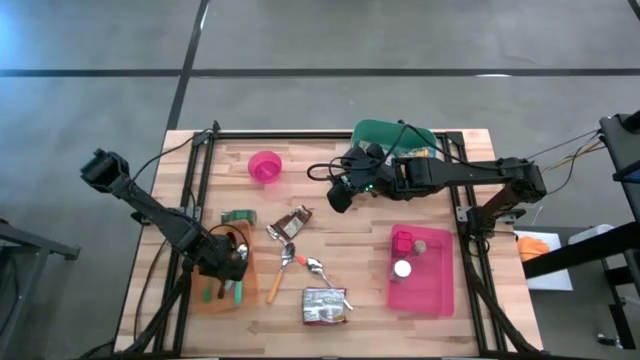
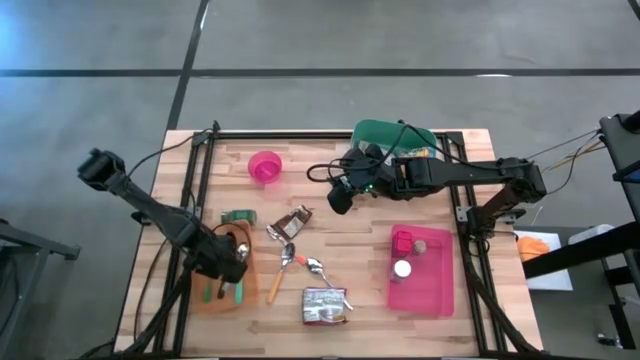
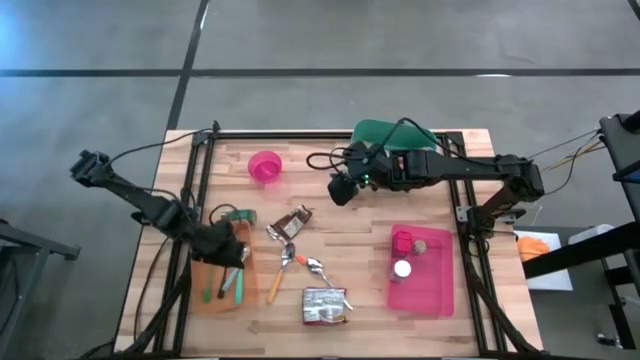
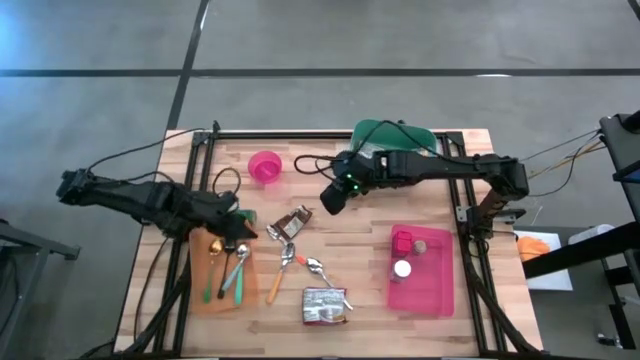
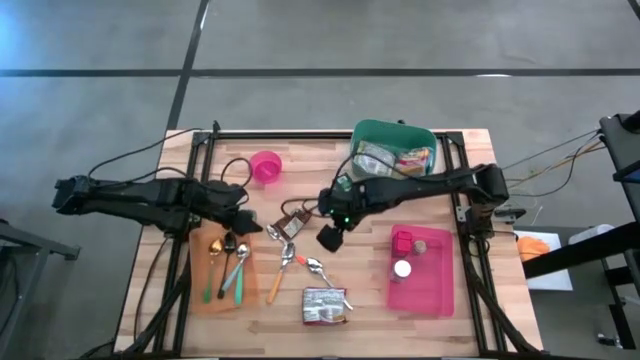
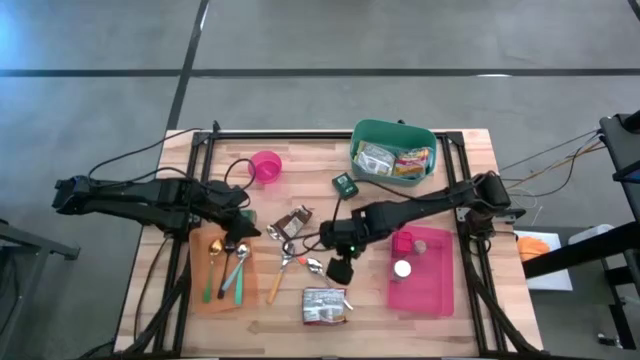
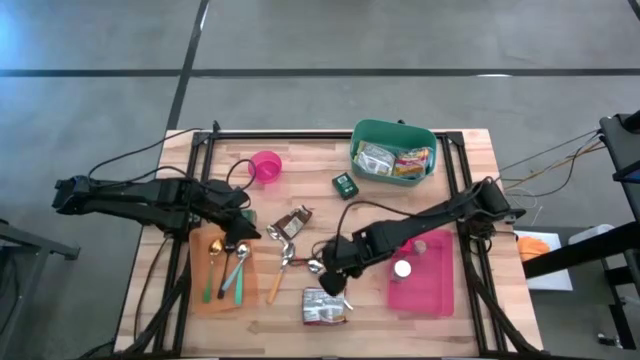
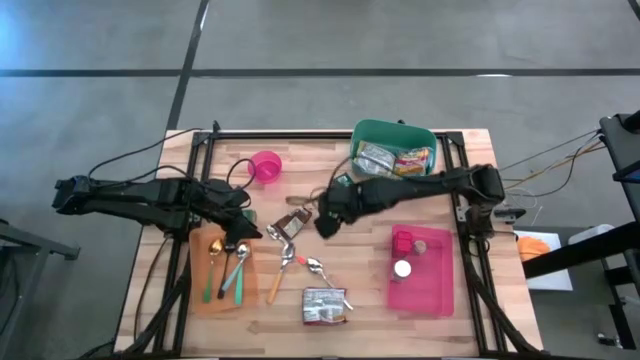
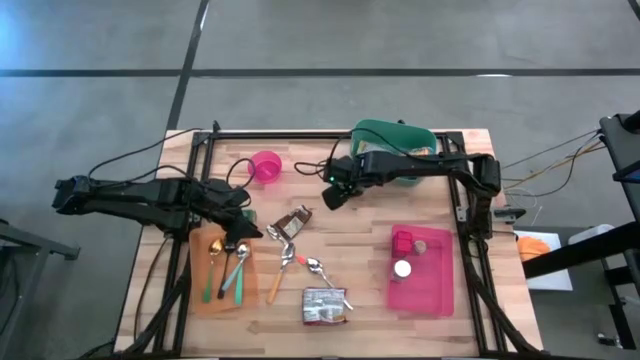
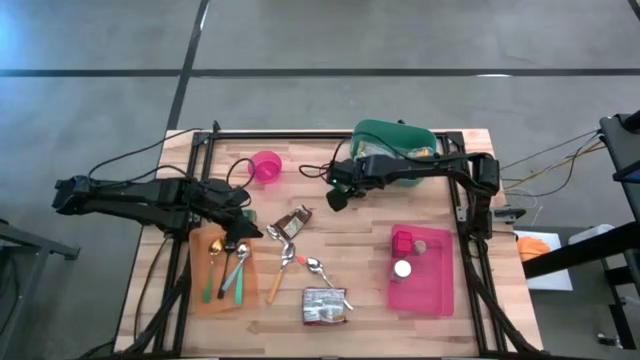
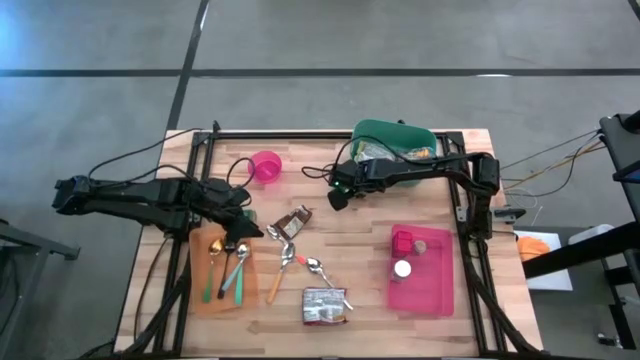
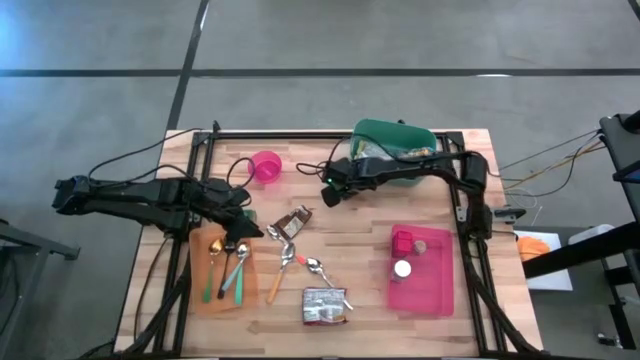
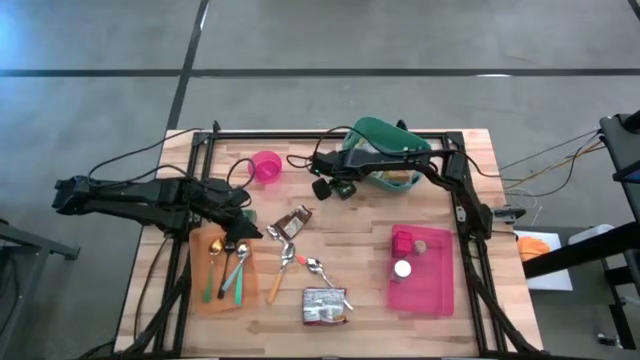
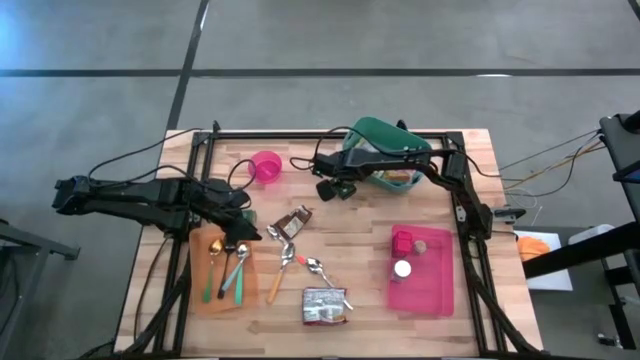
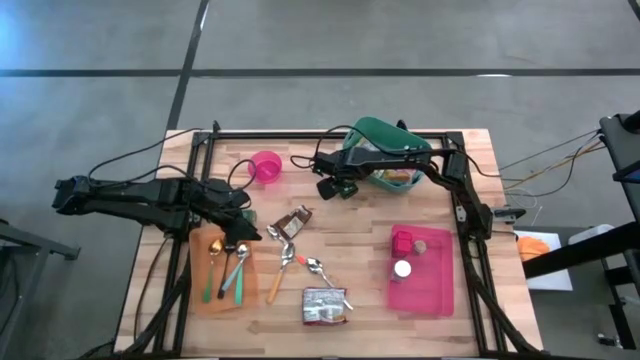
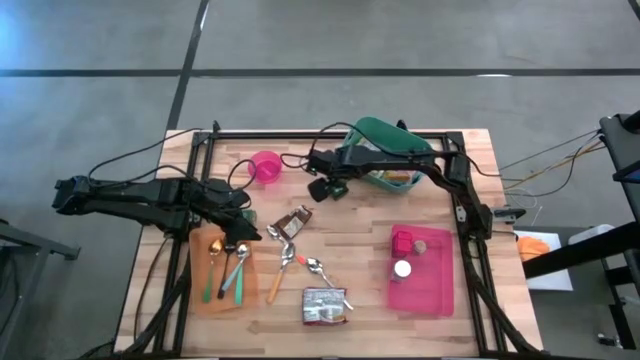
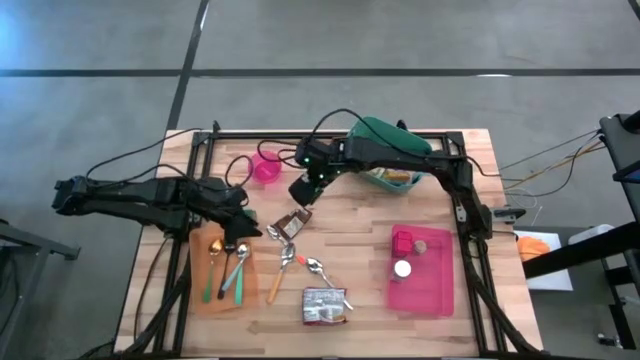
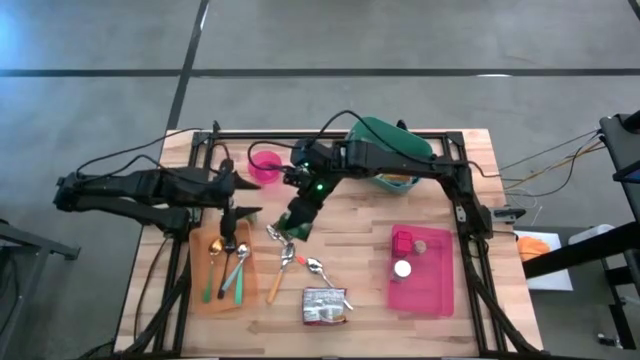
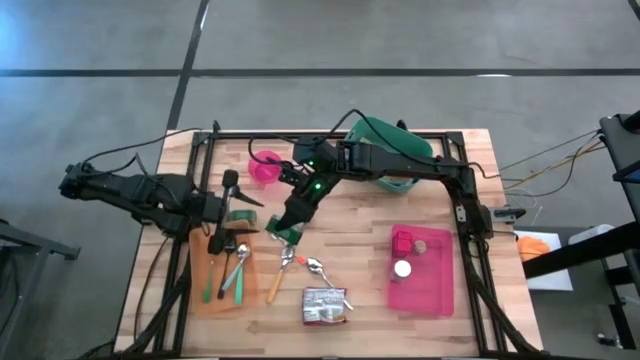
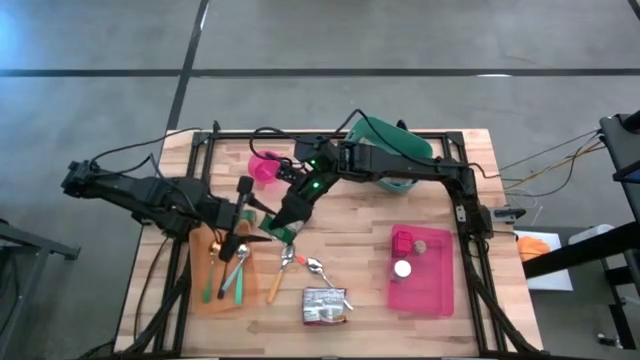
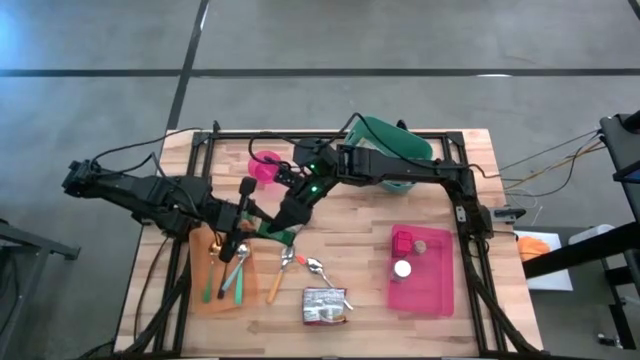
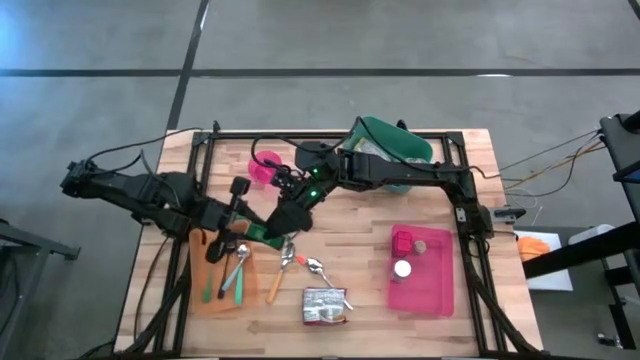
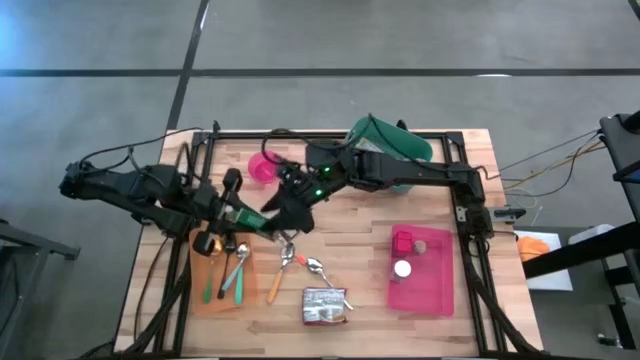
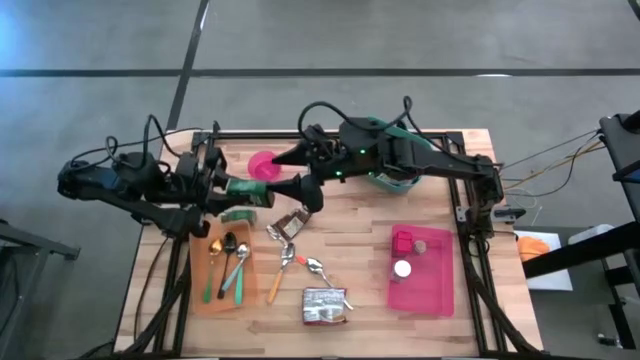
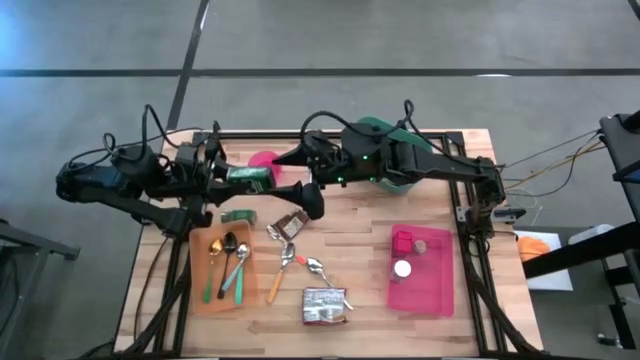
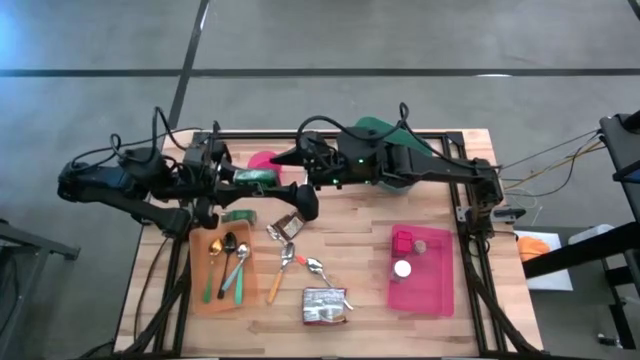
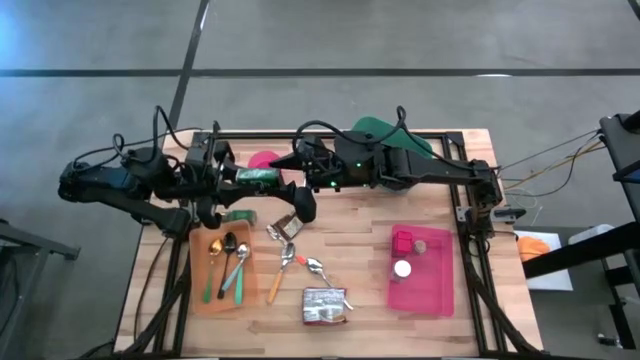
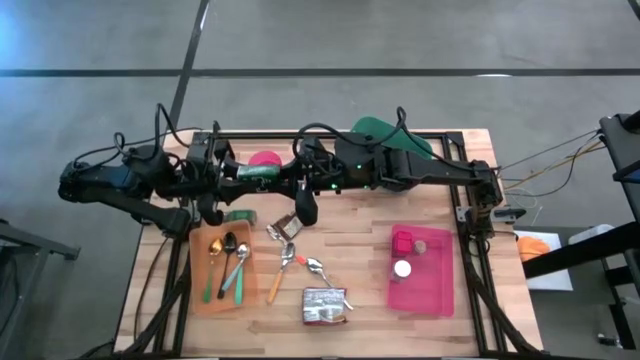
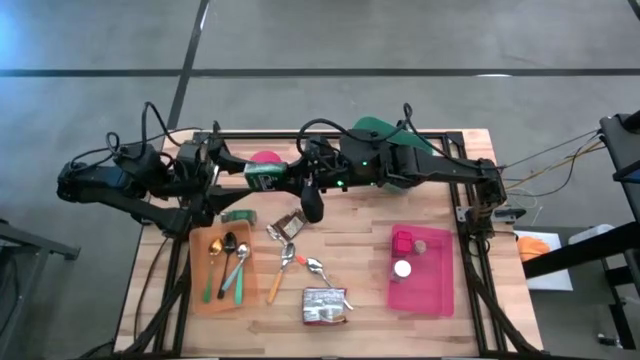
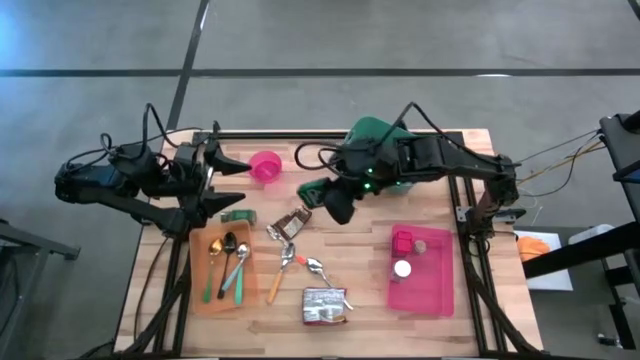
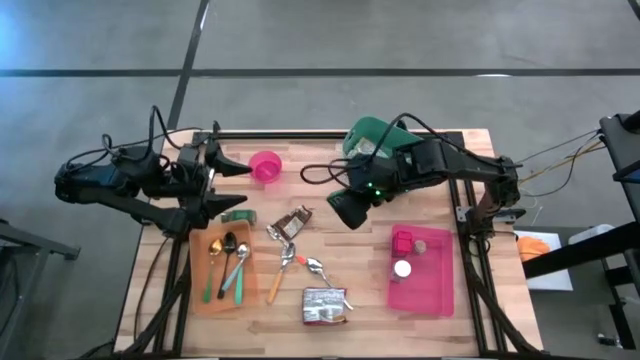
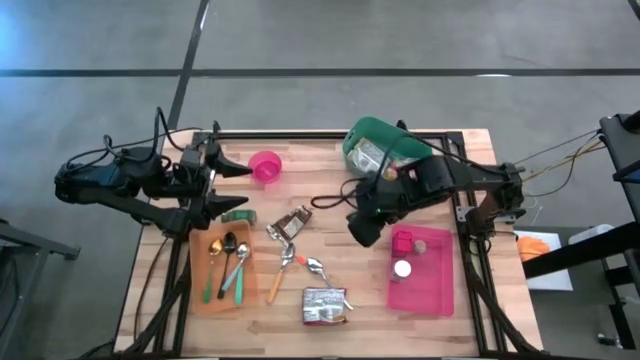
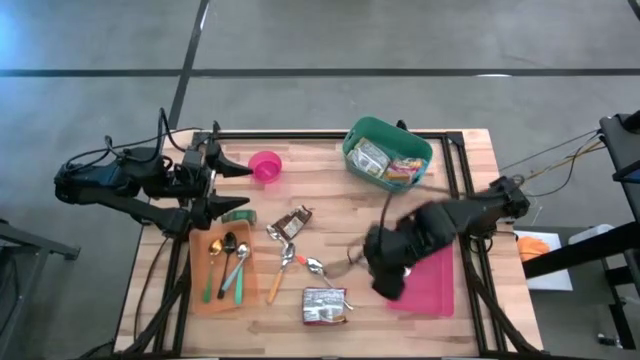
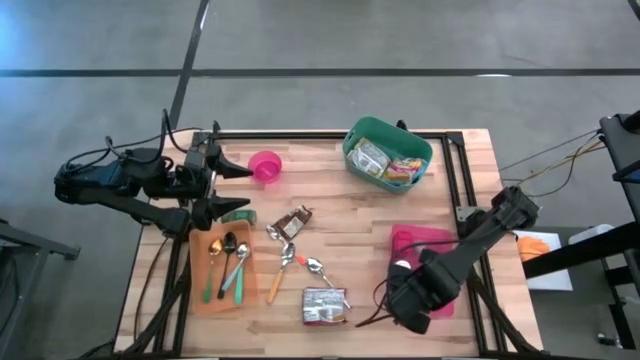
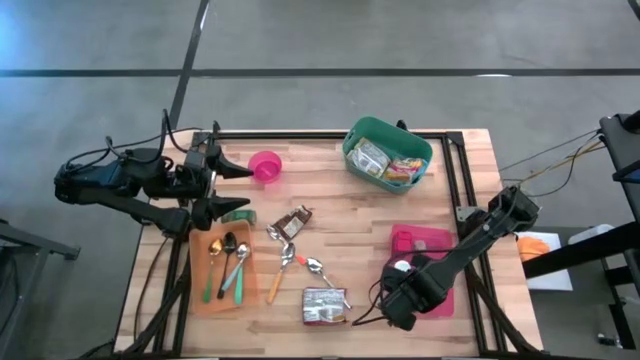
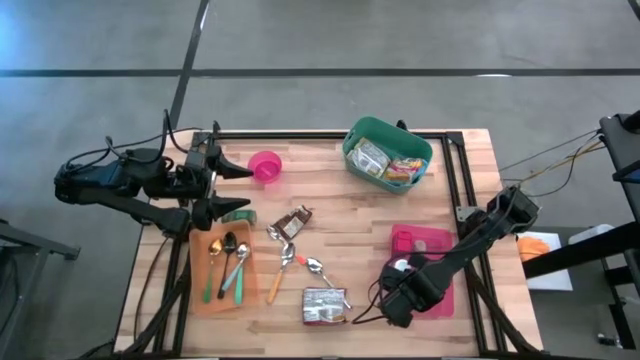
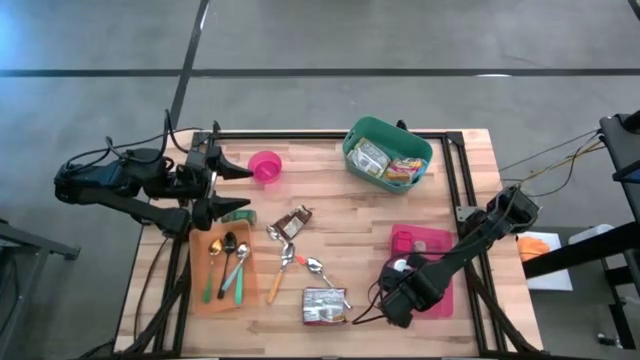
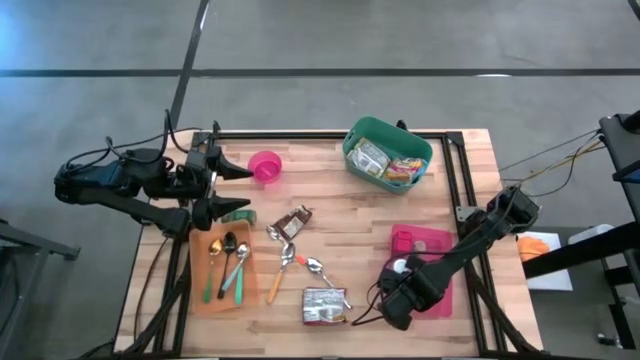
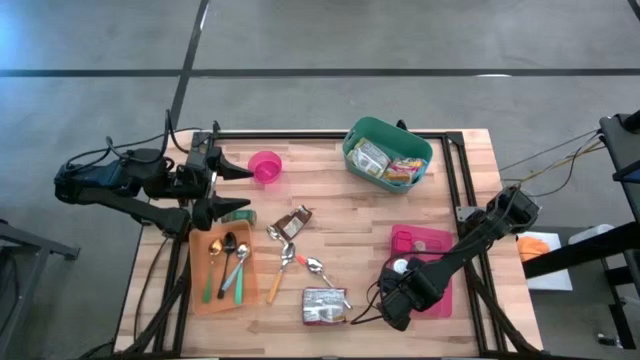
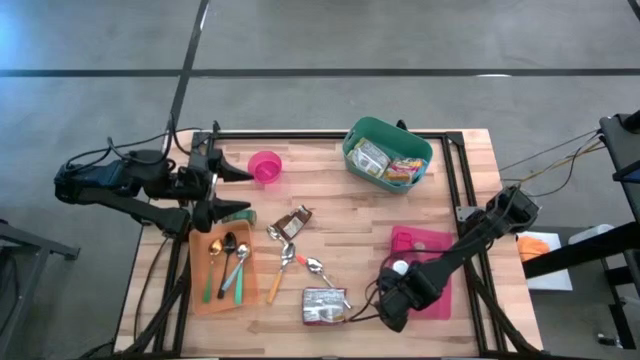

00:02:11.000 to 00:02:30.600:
Task: Pick & Place Food Item
Put the green seasoning can into the pink bin
